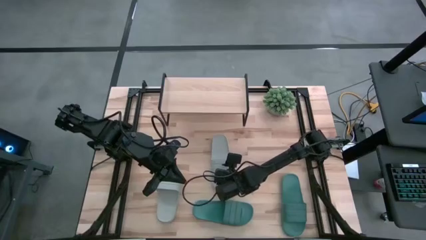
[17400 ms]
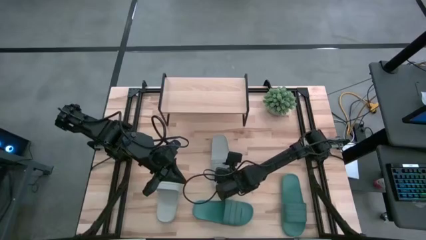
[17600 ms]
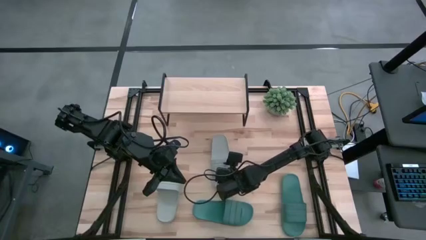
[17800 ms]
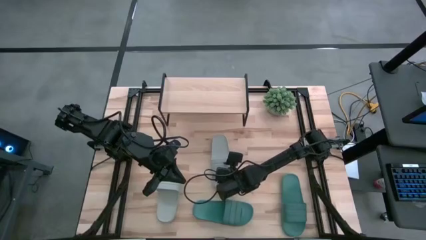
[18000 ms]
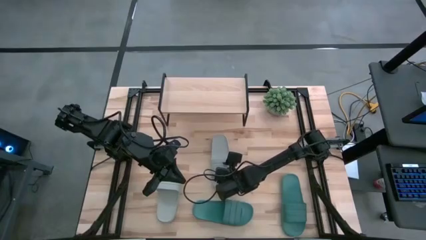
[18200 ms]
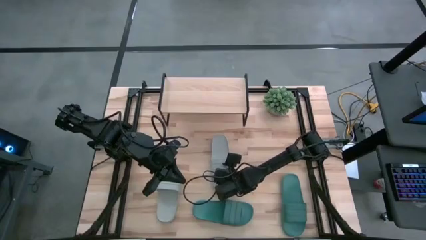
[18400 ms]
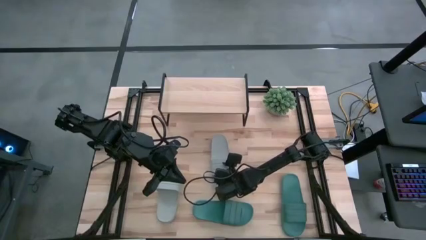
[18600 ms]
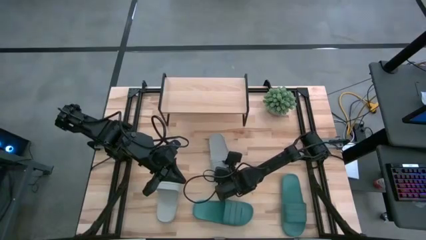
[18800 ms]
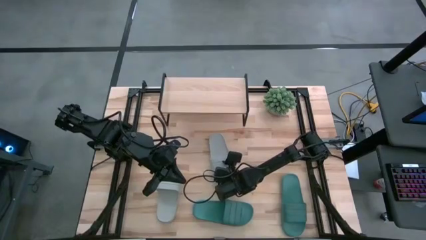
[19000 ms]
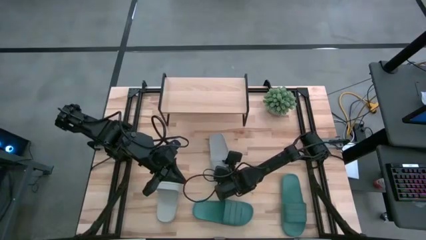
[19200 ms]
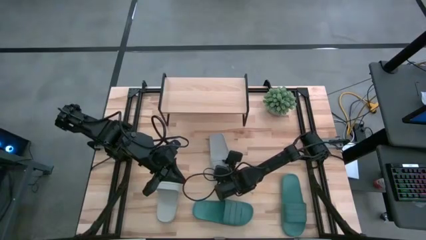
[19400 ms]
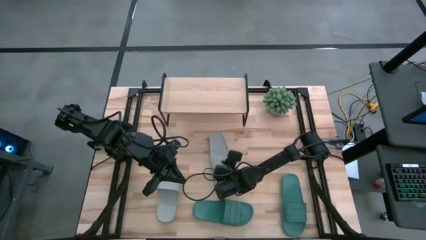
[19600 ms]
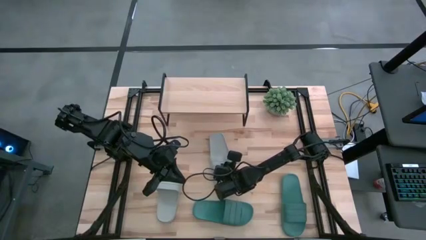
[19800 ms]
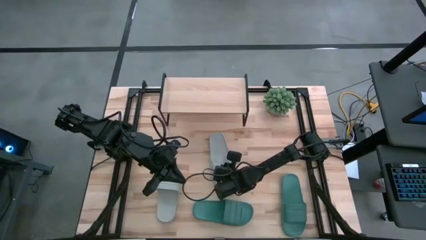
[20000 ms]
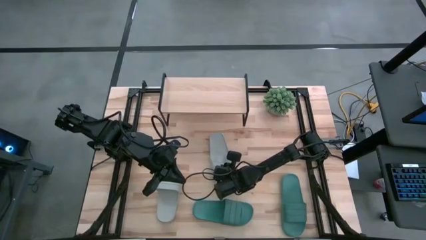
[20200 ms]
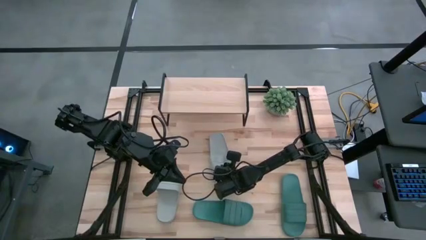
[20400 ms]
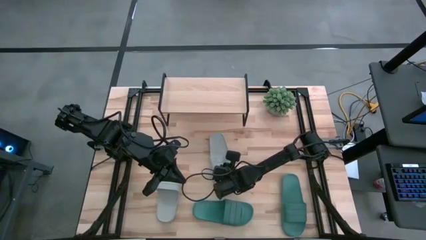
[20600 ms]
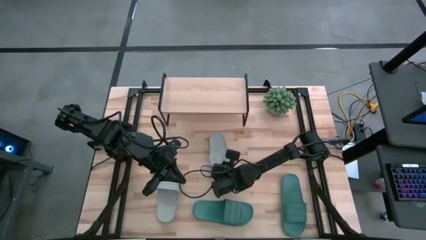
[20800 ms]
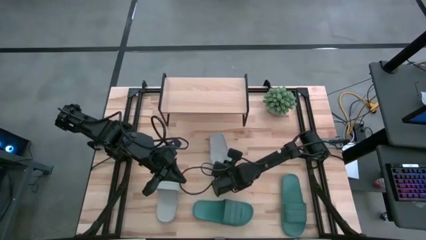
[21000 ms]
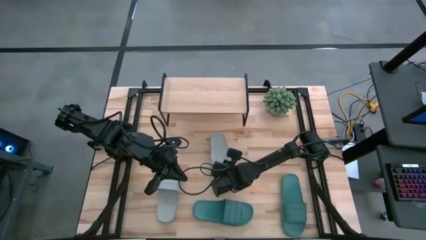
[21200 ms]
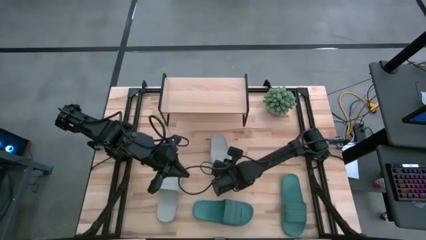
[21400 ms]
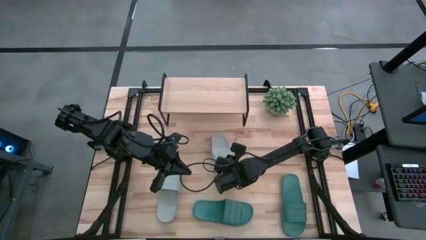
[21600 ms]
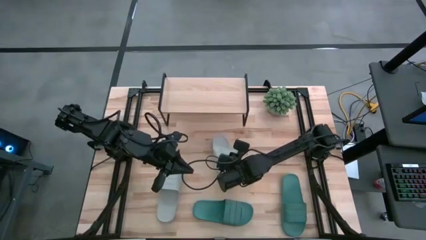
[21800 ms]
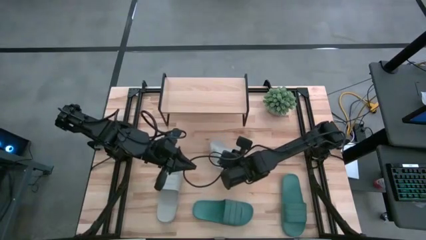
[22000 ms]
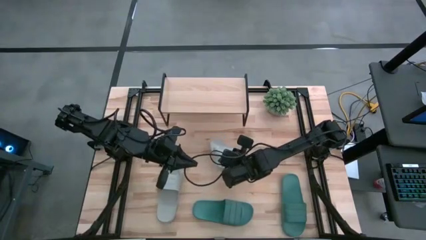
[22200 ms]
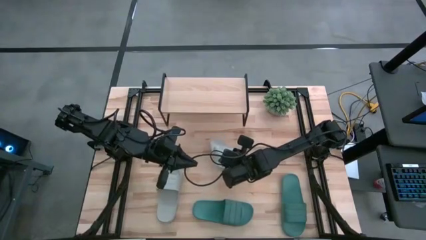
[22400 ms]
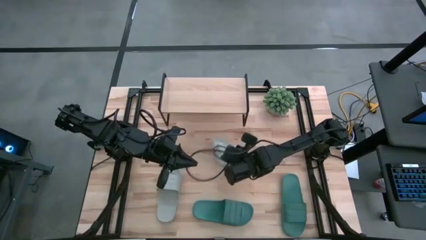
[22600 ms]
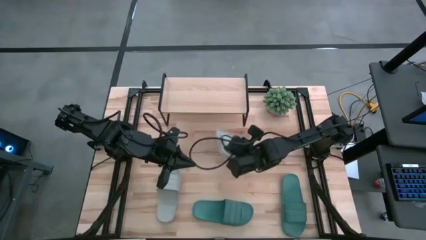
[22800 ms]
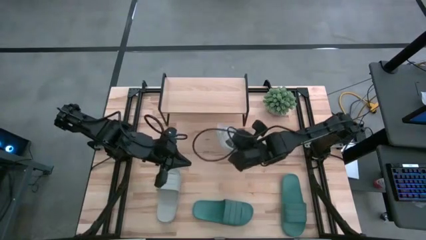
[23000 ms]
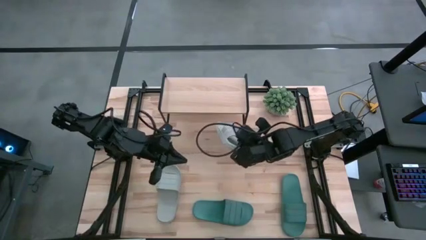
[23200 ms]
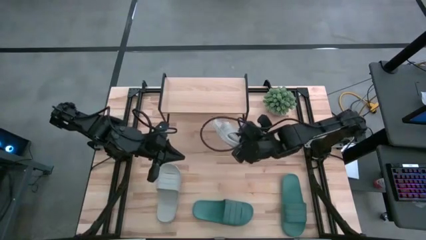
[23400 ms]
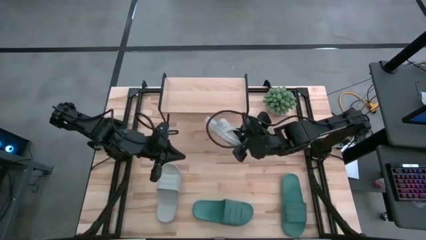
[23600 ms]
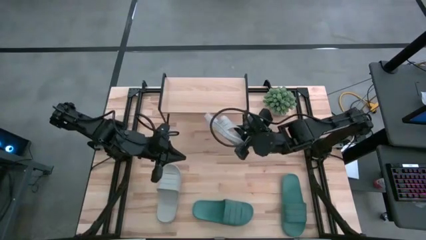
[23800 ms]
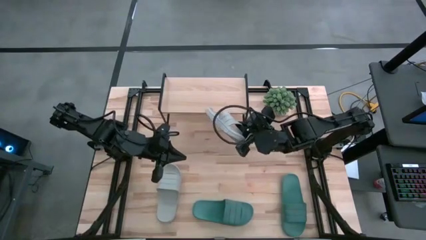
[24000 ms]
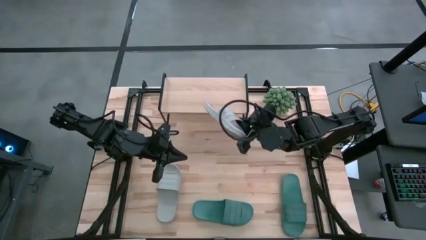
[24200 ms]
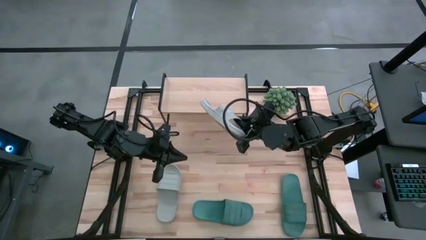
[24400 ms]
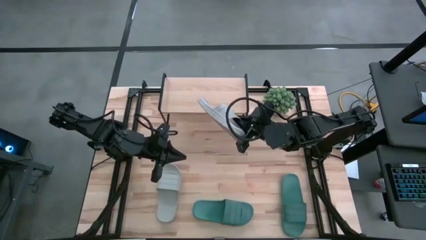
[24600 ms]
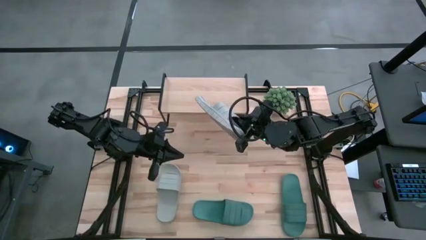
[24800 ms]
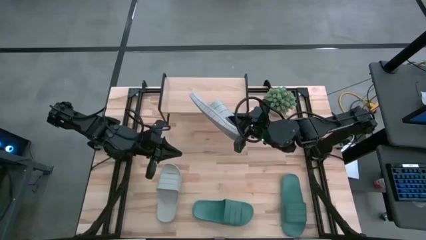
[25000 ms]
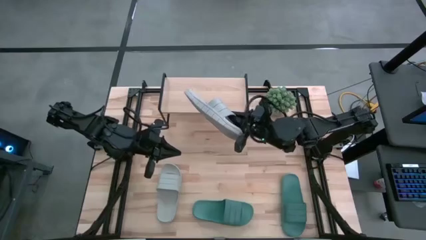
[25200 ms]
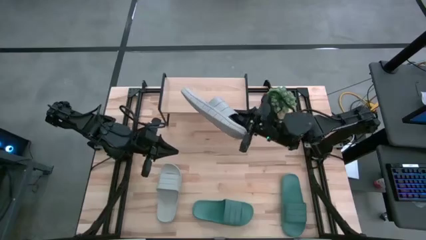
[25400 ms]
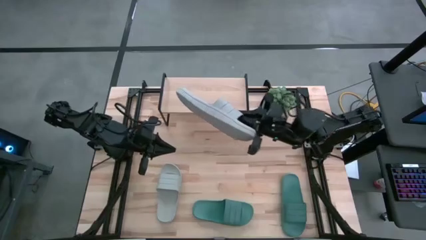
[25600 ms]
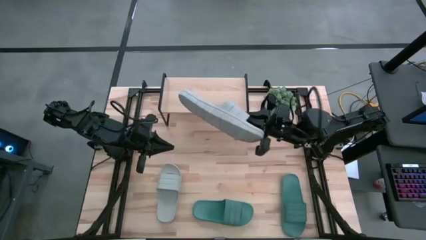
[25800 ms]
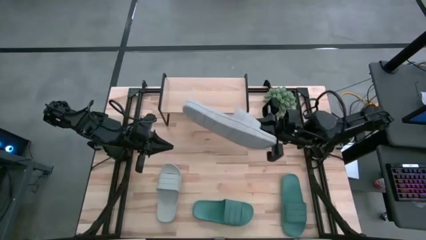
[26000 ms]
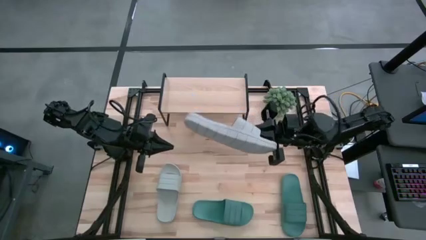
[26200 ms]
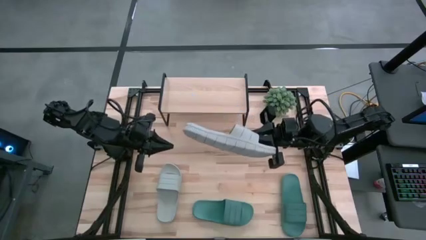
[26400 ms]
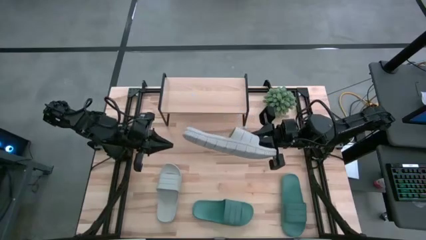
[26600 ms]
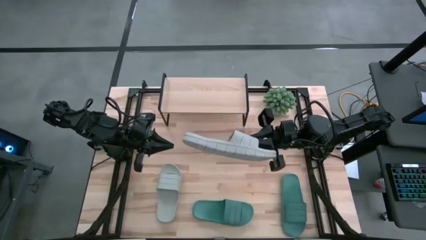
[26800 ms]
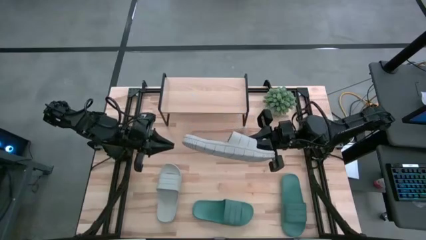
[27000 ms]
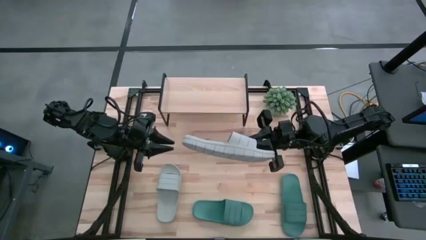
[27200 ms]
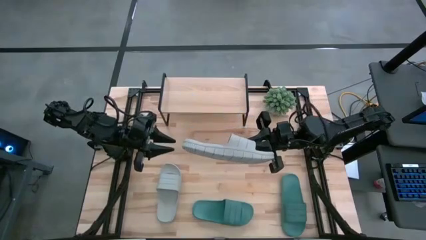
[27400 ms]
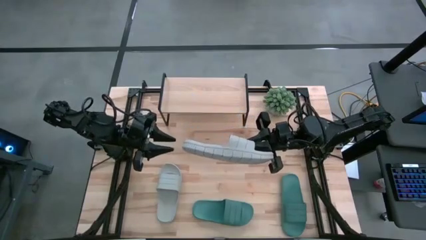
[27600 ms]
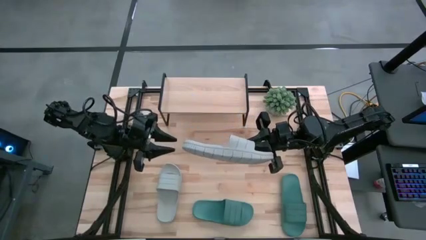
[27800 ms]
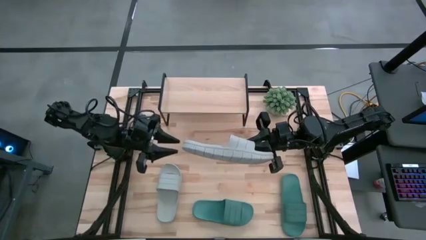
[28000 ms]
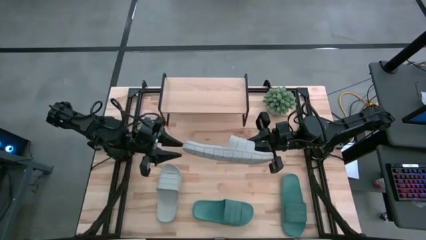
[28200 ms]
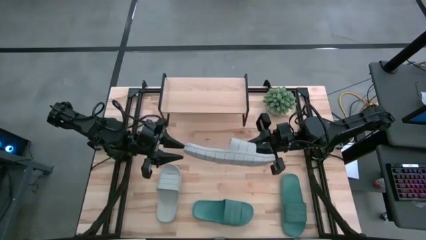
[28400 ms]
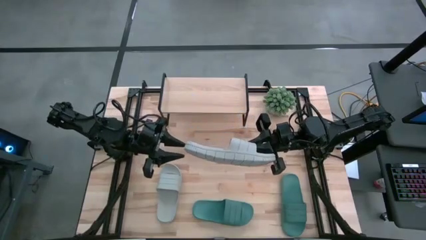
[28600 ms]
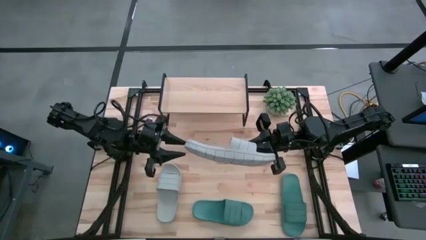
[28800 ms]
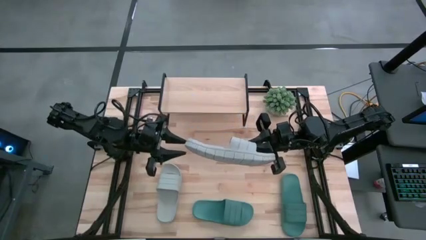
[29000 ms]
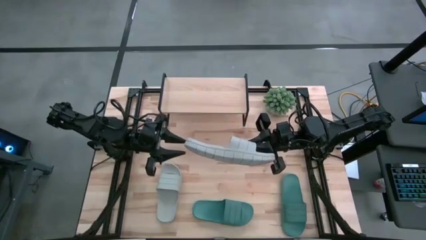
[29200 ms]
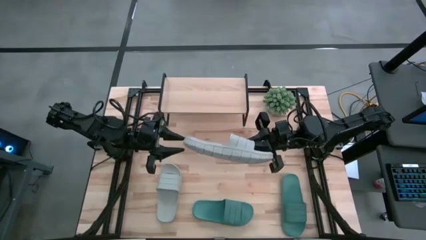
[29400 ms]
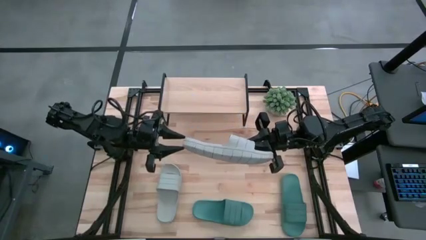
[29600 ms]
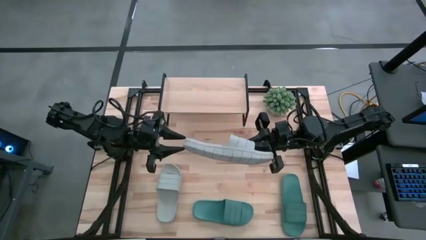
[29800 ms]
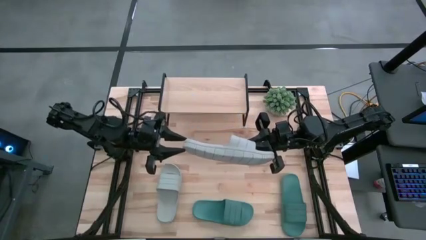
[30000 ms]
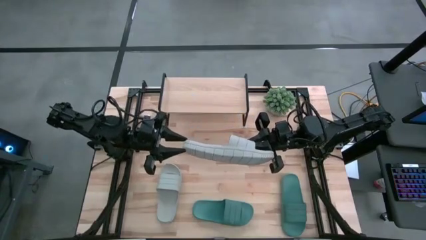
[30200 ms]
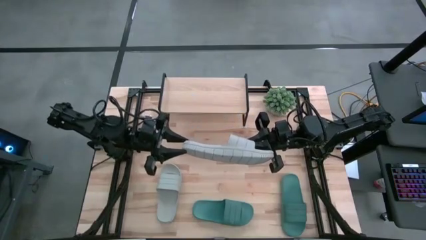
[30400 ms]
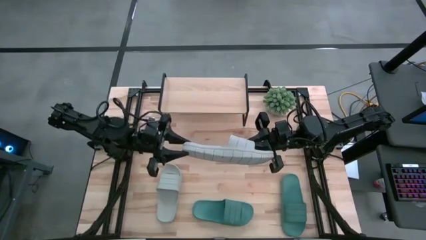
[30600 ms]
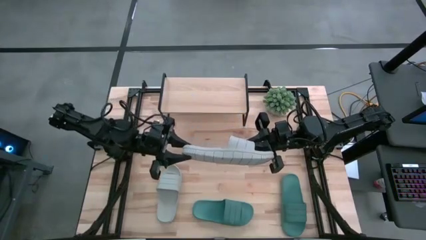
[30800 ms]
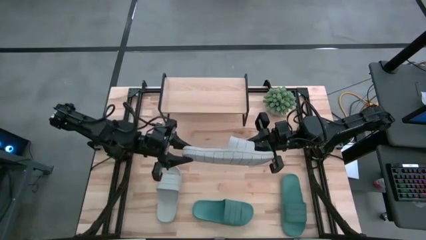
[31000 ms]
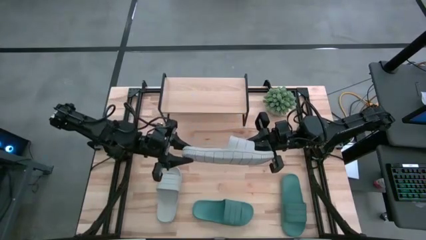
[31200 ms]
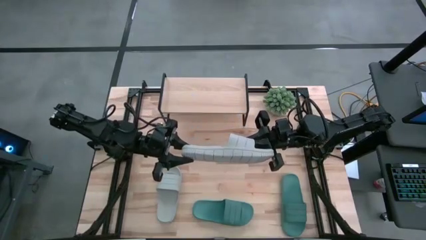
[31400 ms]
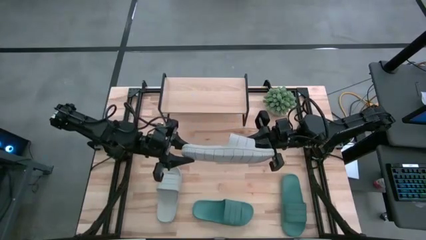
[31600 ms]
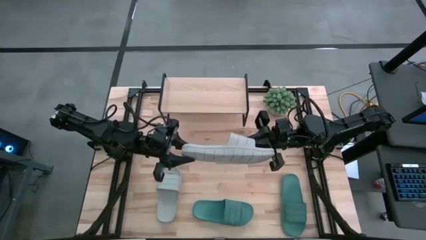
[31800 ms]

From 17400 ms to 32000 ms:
Task: Pick and place slides into the shelf
Put the right gray slipper on the shelf
